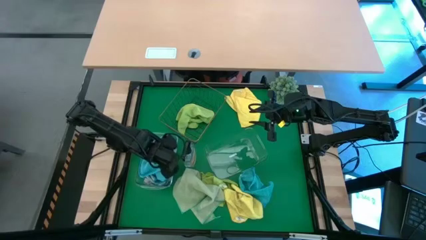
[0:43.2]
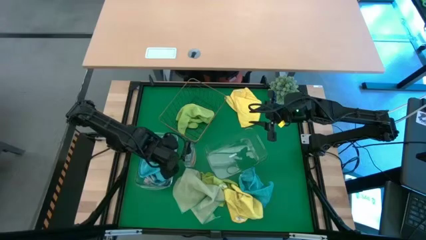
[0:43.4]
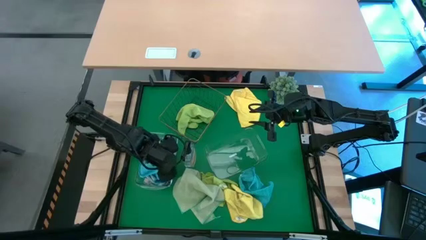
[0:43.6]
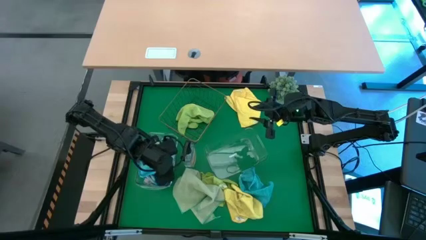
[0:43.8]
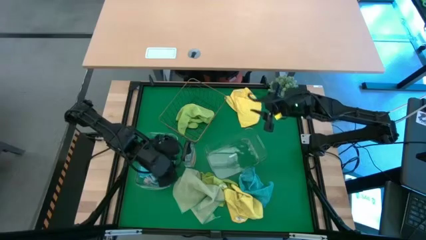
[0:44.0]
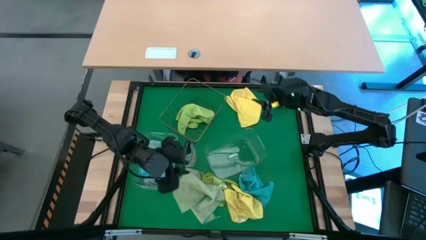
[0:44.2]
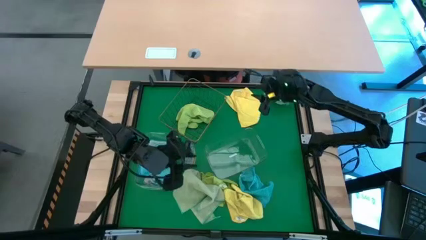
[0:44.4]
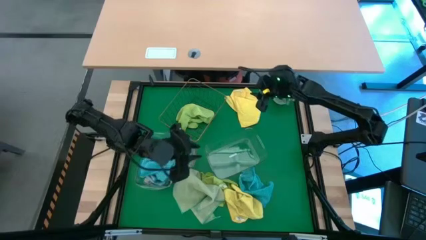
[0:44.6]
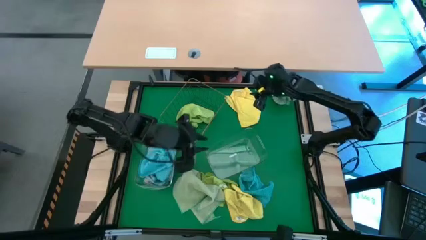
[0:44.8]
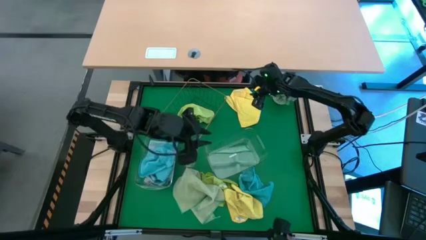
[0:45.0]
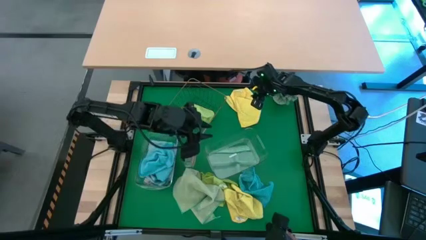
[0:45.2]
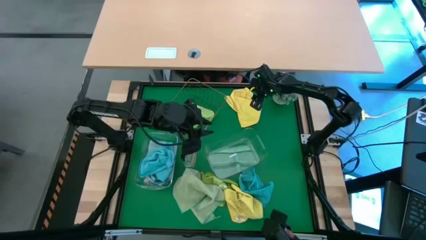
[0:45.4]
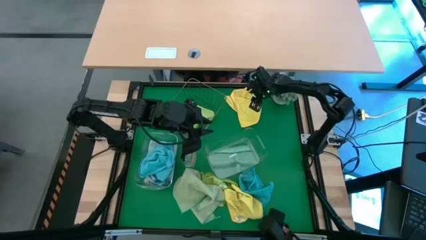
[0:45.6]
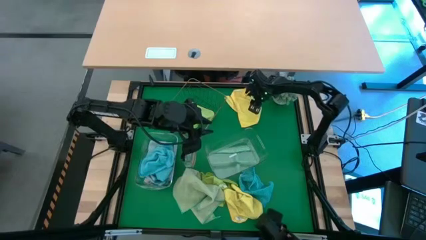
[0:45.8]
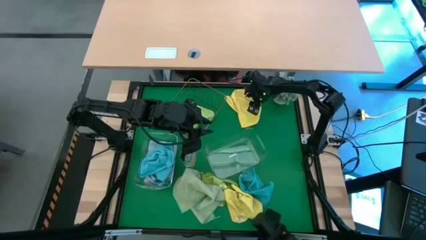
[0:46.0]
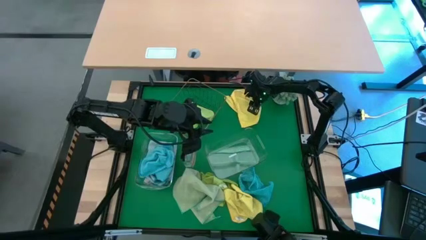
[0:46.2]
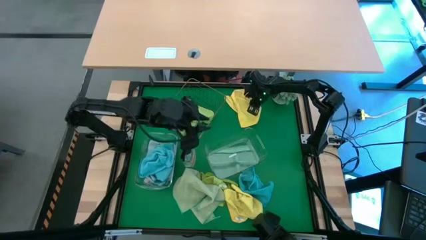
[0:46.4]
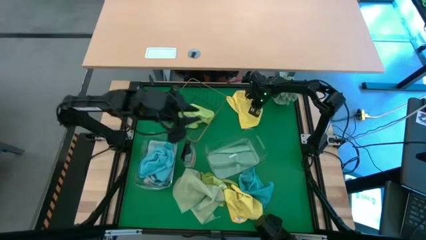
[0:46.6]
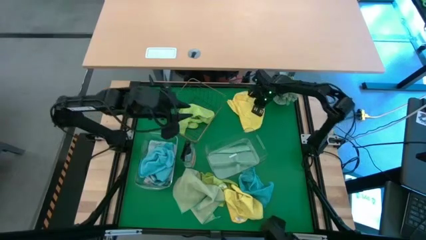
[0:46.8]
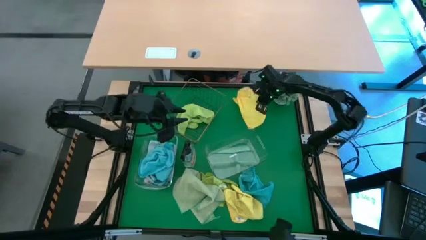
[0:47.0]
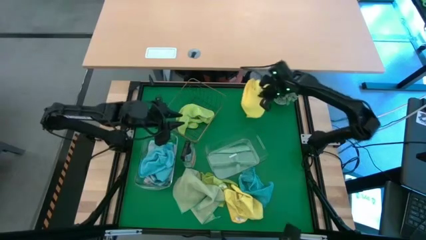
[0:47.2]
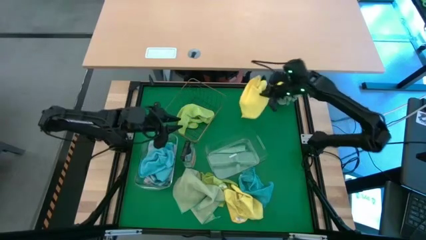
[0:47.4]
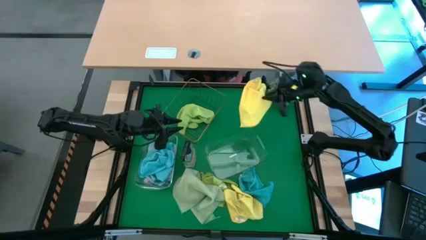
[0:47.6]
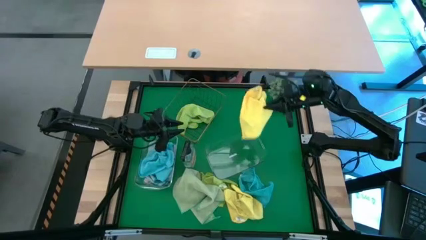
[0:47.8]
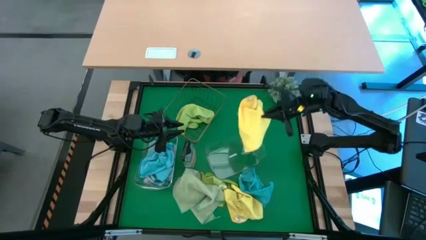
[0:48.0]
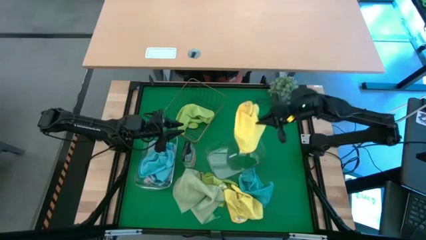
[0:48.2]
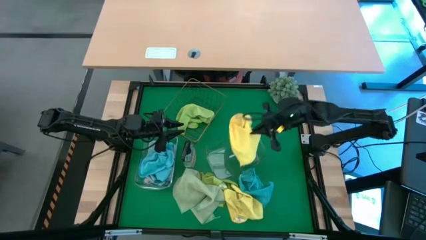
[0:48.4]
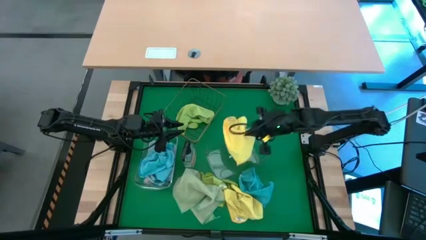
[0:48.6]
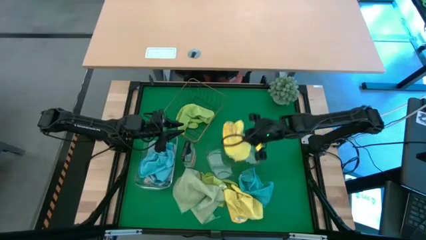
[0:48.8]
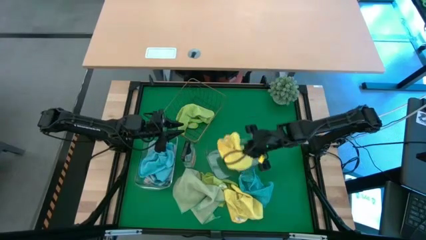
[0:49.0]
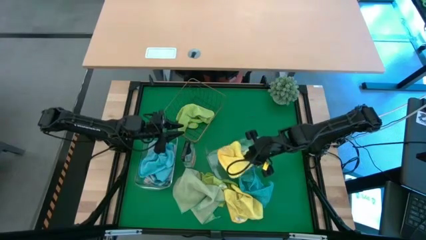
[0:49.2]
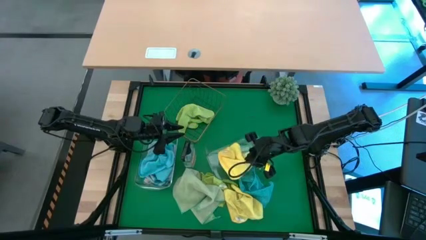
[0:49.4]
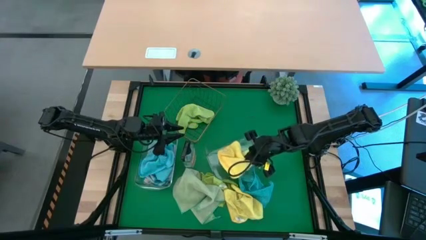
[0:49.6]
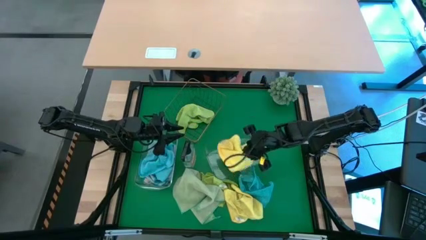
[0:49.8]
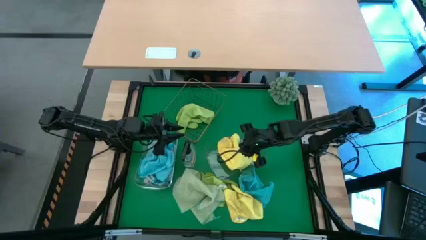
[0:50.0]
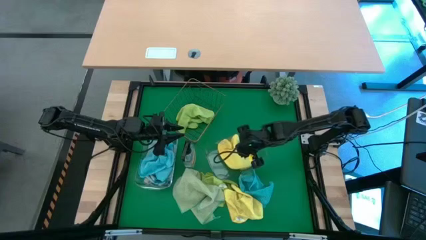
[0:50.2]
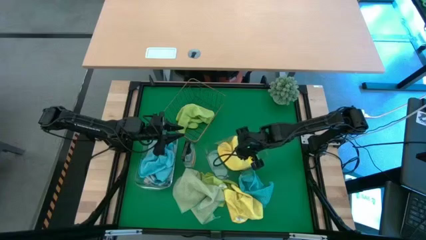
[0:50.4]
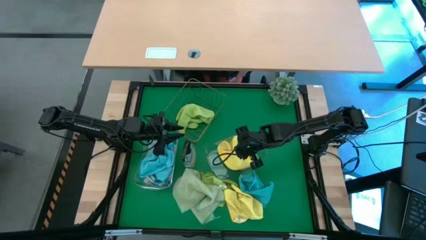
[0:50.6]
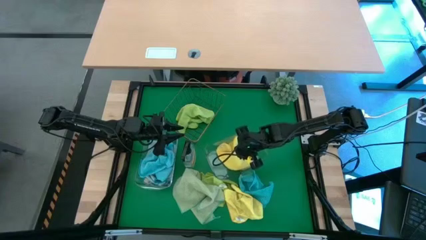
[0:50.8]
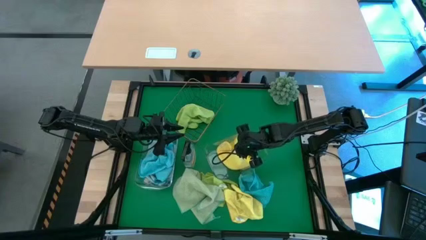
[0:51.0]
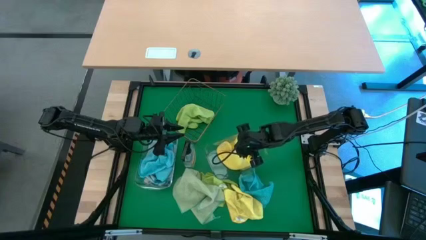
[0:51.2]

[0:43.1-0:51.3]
Task: Sort microfiber towel by color & place in baskets
Put the top yellow microfiber towel into the right transparent bin

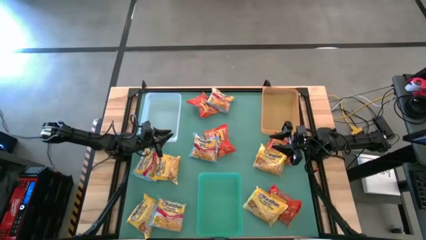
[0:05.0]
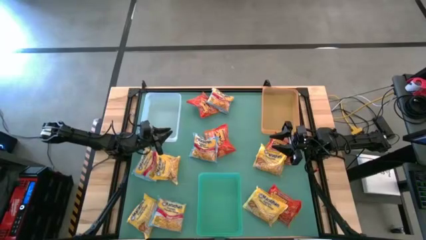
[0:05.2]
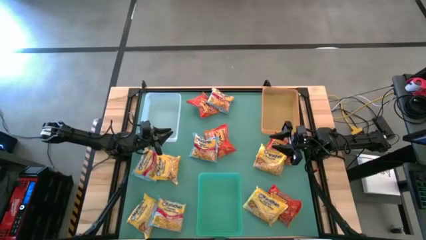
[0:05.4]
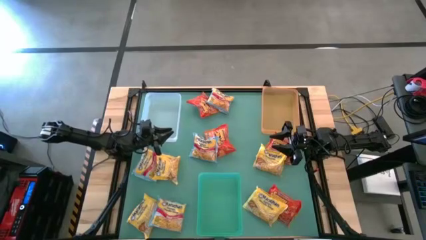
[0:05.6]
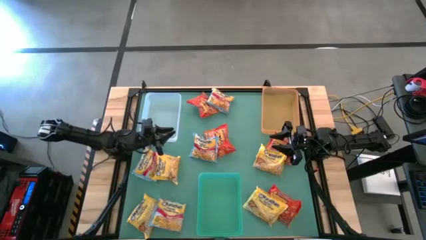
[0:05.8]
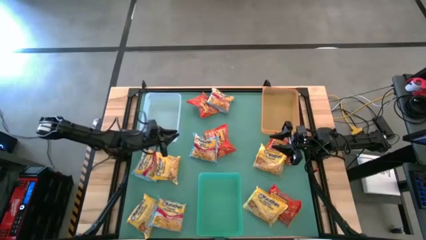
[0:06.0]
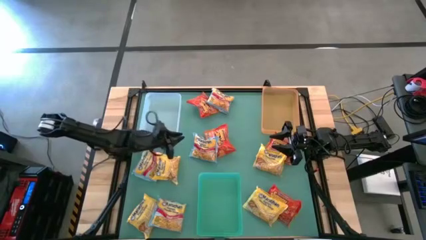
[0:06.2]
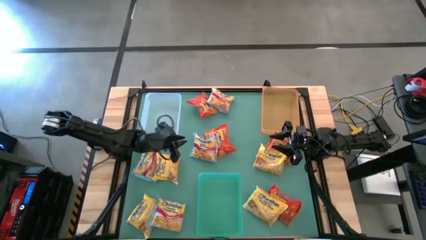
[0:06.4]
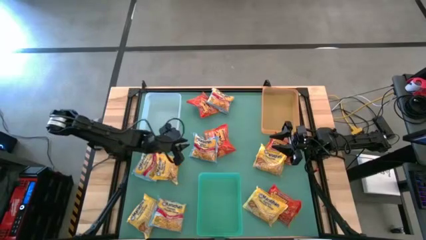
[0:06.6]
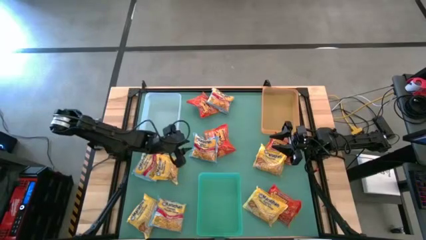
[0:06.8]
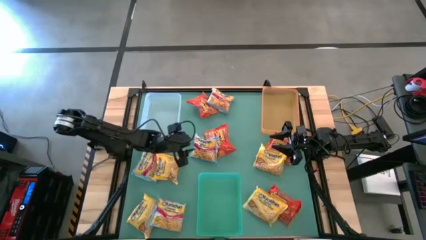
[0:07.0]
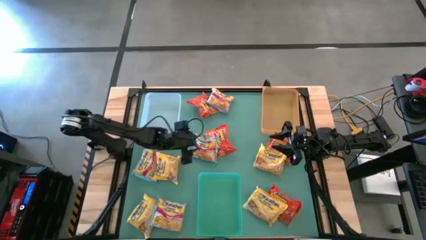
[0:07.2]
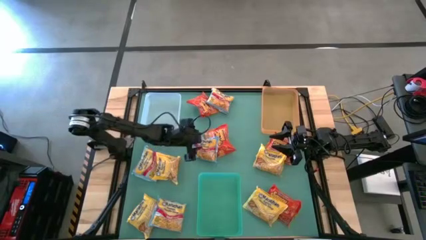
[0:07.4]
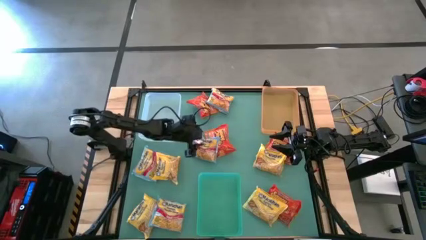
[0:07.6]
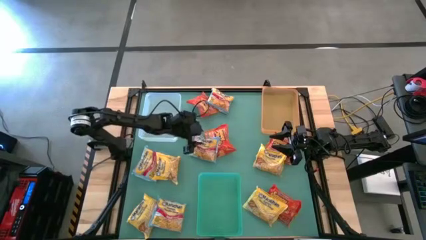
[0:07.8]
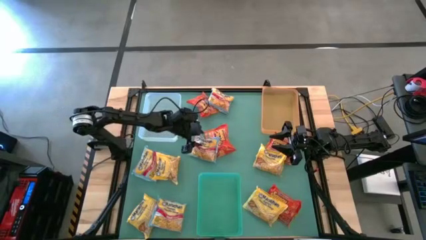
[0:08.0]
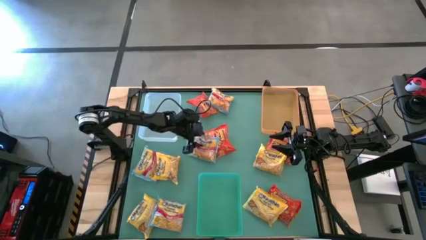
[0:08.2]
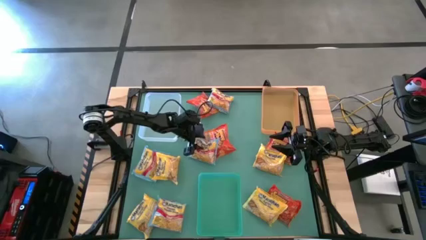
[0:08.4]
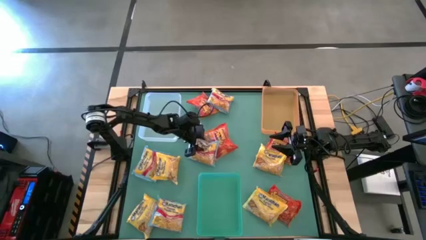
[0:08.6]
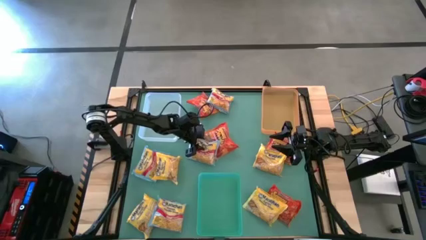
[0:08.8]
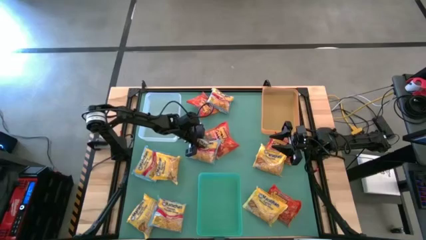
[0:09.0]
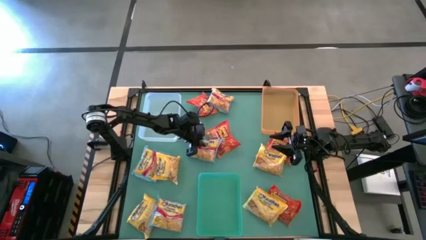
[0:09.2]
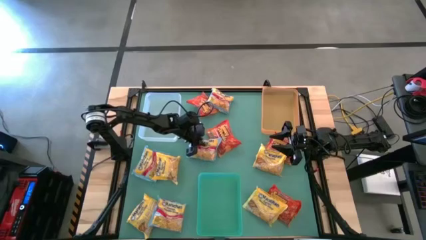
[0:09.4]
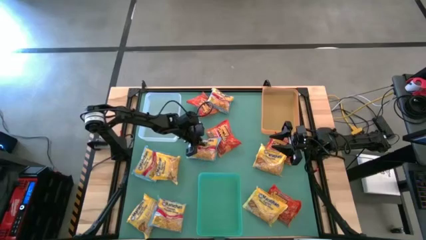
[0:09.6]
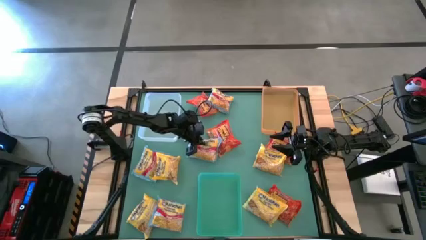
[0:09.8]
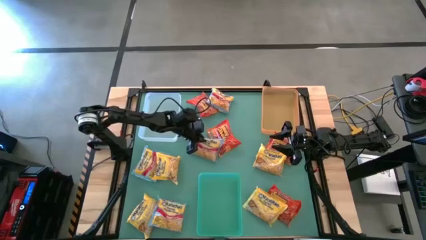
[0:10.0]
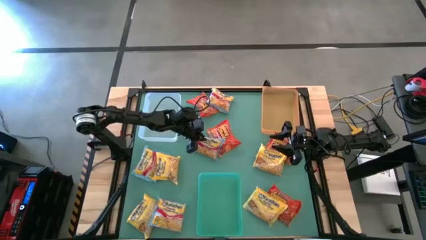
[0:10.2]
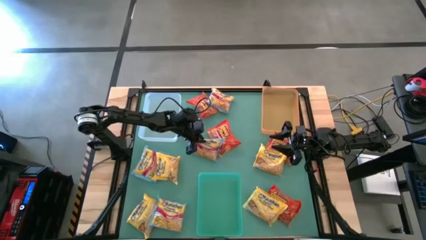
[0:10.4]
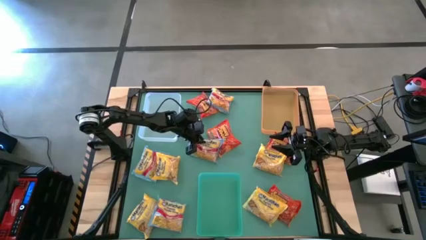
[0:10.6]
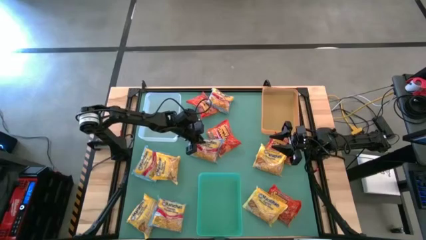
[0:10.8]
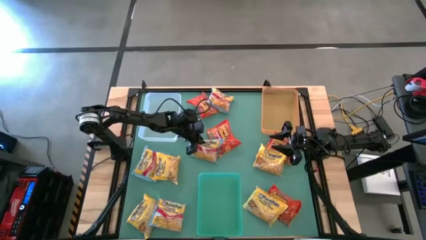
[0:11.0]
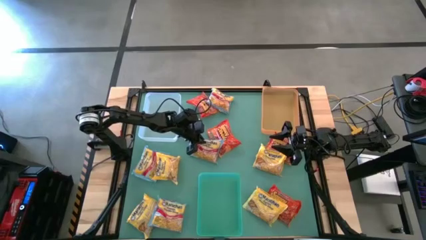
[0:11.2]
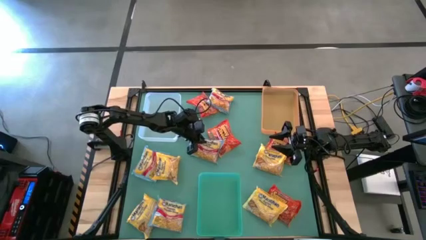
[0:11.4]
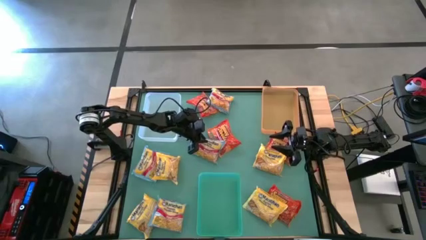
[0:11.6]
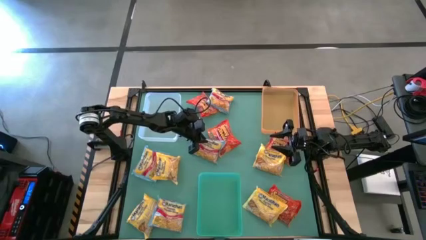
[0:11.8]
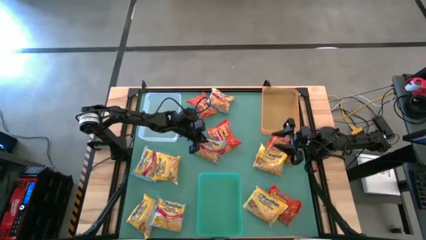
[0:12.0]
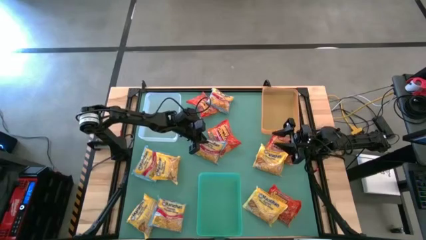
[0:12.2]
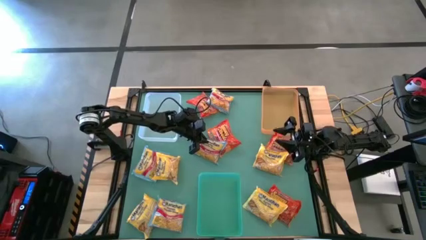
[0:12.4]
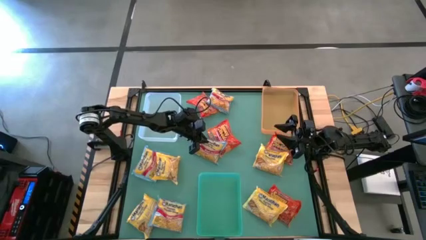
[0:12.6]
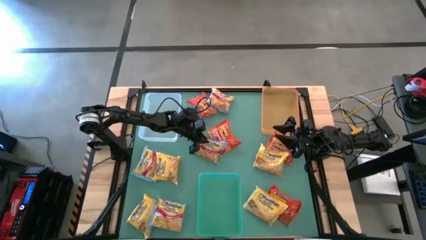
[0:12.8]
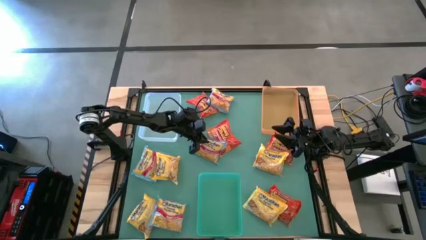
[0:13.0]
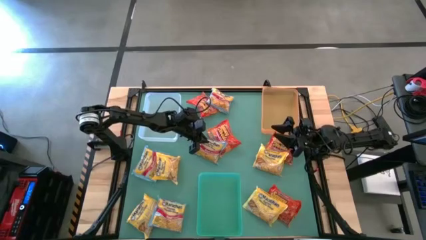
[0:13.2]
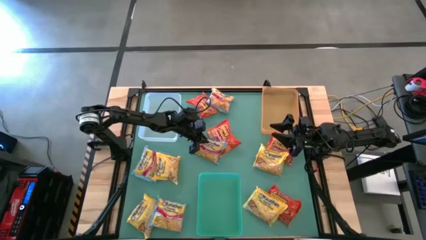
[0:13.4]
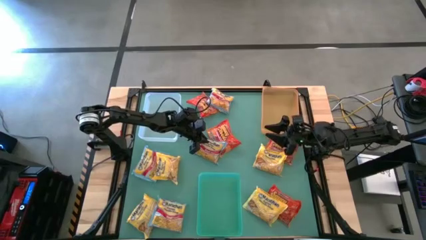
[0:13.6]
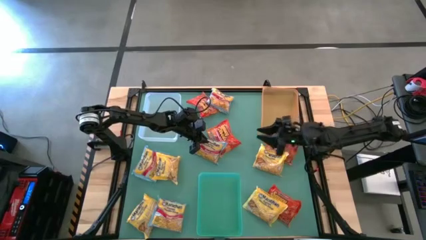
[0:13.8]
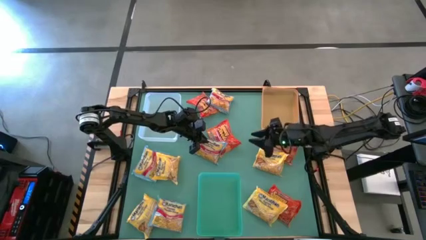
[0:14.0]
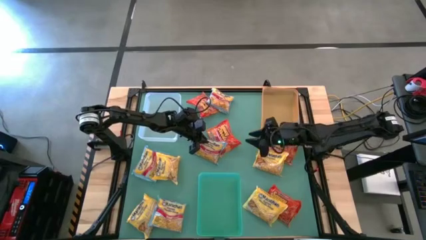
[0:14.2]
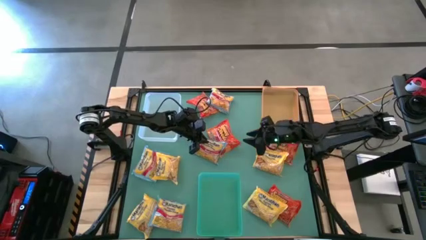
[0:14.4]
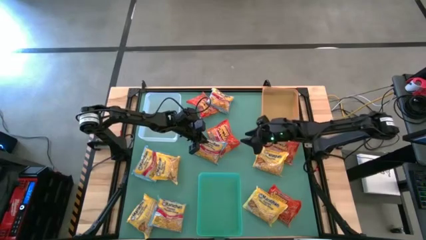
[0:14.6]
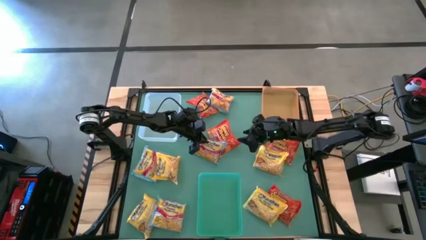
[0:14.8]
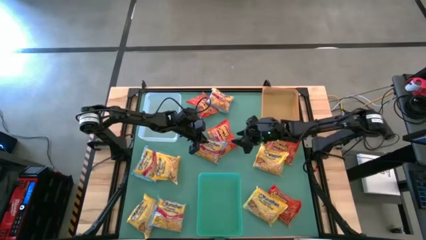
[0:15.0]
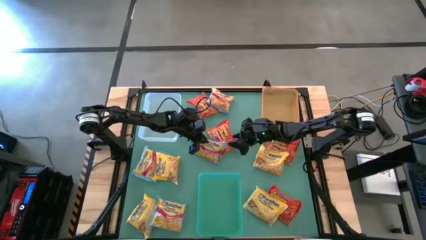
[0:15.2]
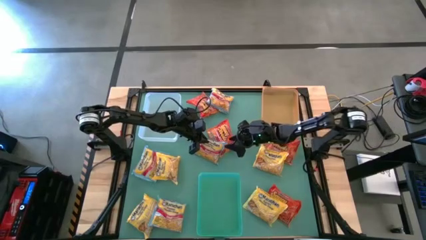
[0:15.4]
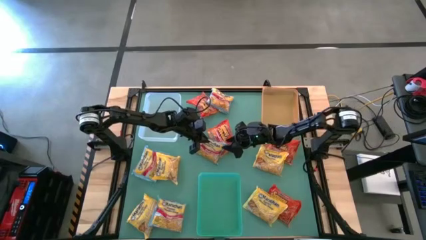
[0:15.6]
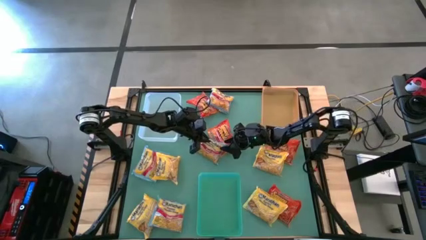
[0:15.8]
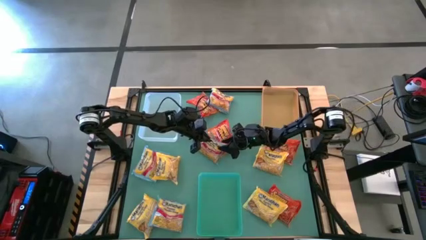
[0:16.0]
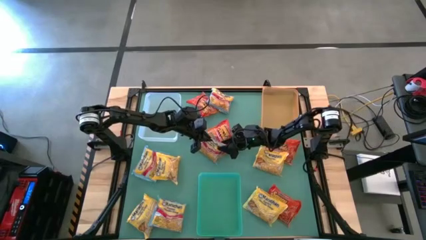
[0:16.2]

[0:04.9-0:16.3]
Task: Sort Maruchan noodles
Put the blue noodle pack into the transparent bin
